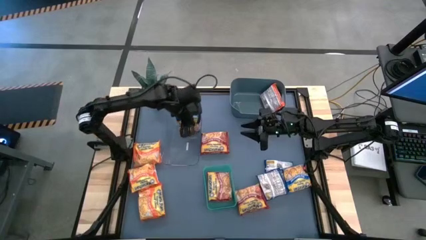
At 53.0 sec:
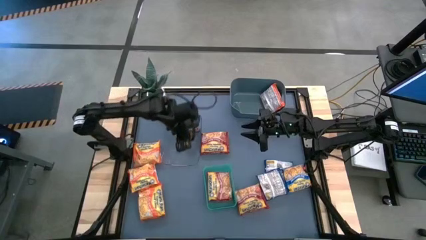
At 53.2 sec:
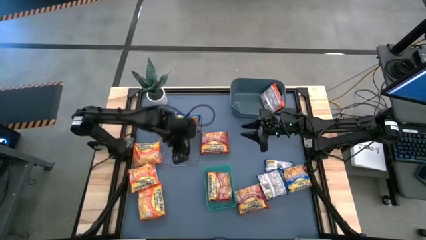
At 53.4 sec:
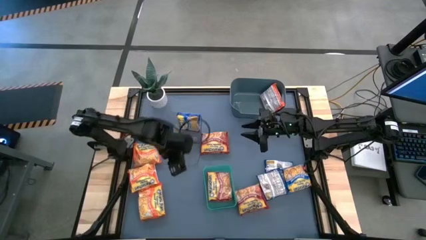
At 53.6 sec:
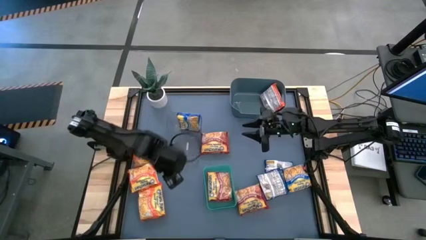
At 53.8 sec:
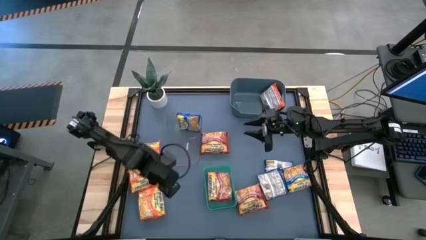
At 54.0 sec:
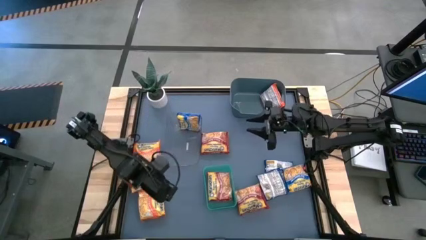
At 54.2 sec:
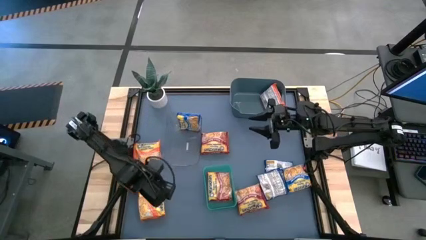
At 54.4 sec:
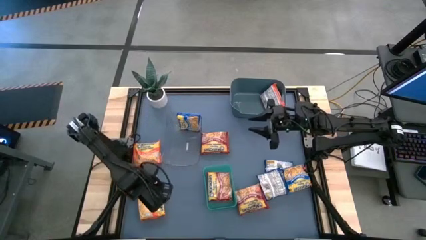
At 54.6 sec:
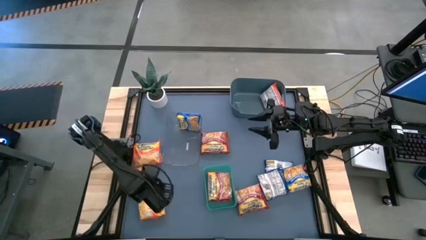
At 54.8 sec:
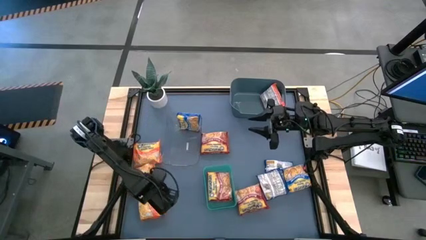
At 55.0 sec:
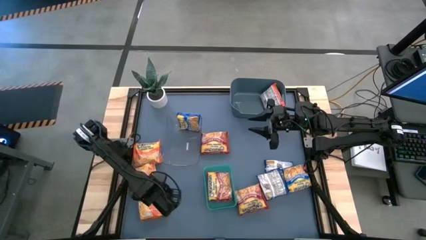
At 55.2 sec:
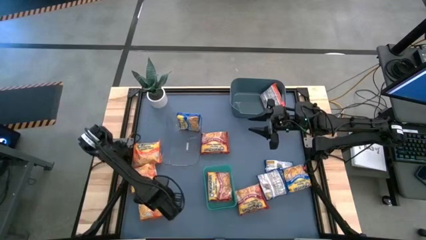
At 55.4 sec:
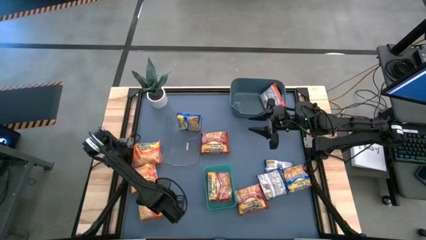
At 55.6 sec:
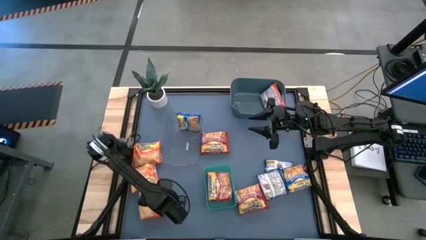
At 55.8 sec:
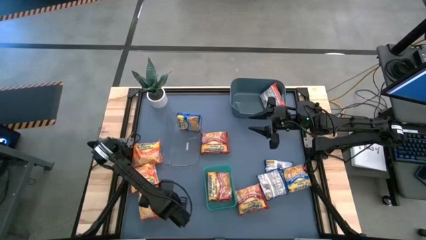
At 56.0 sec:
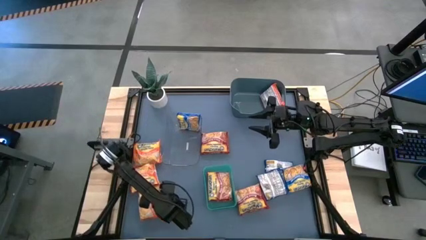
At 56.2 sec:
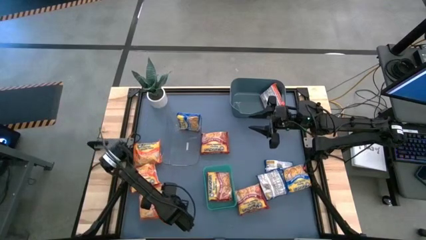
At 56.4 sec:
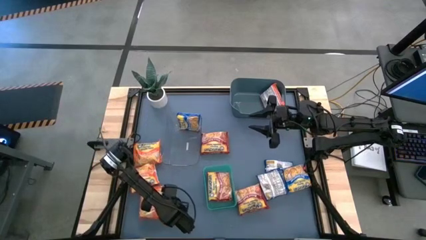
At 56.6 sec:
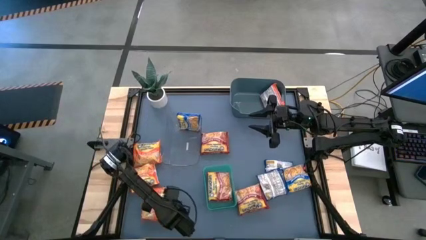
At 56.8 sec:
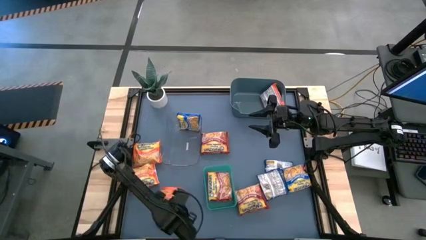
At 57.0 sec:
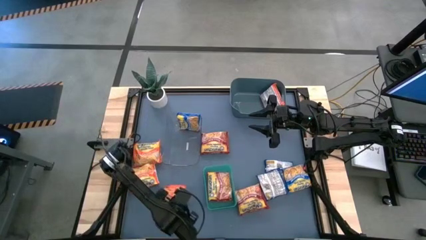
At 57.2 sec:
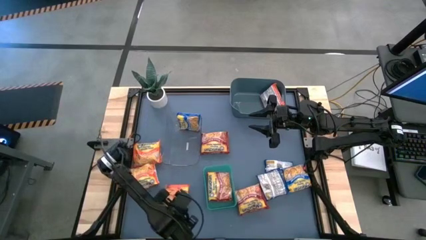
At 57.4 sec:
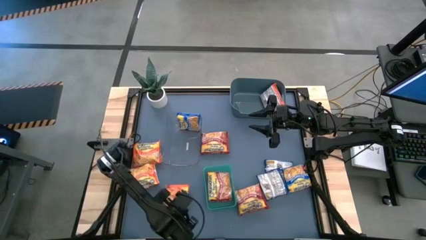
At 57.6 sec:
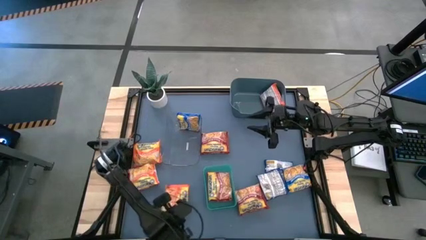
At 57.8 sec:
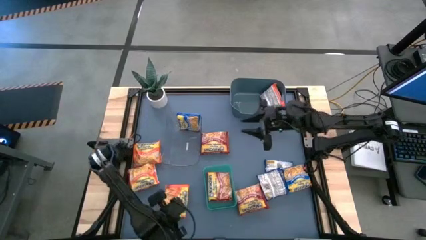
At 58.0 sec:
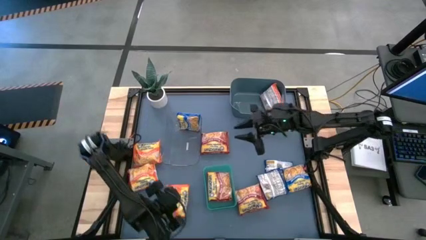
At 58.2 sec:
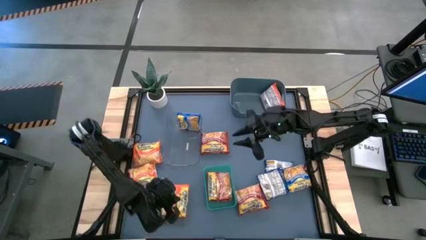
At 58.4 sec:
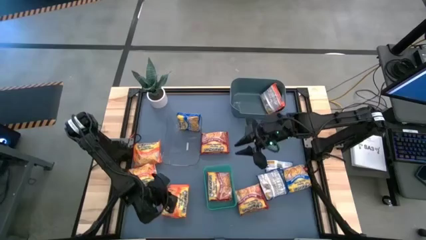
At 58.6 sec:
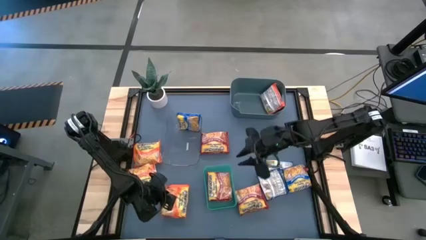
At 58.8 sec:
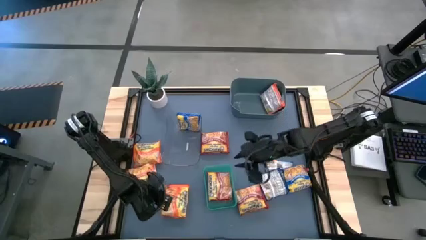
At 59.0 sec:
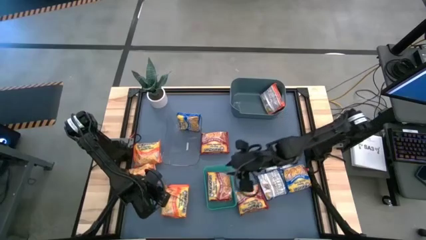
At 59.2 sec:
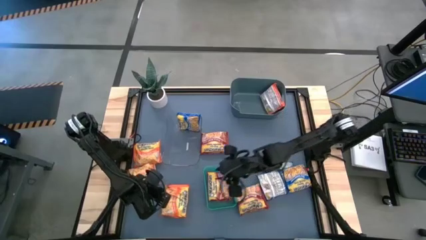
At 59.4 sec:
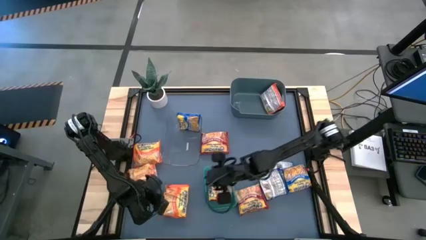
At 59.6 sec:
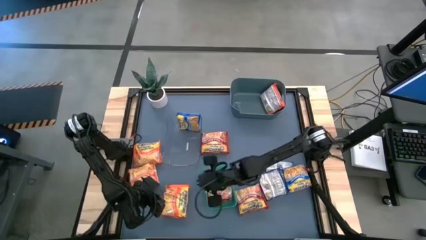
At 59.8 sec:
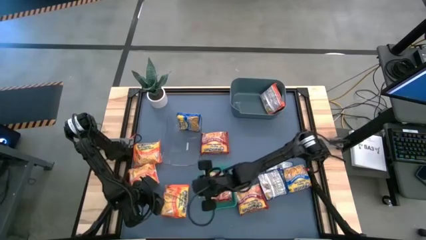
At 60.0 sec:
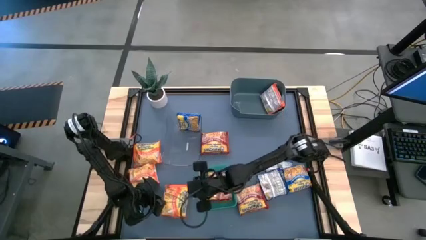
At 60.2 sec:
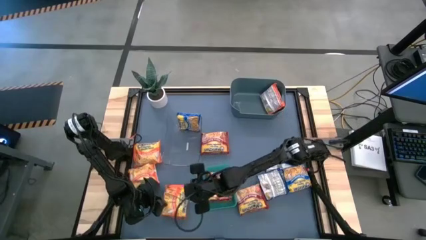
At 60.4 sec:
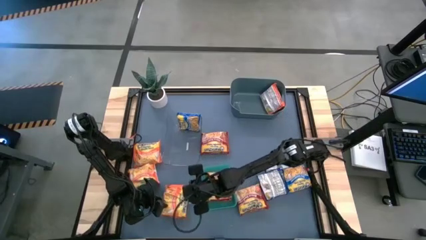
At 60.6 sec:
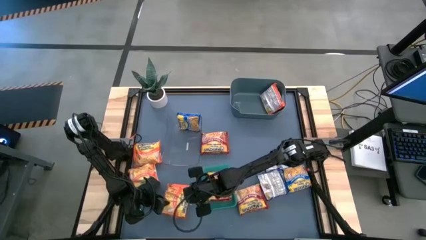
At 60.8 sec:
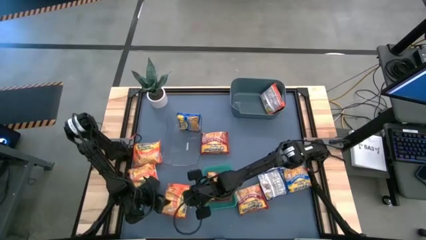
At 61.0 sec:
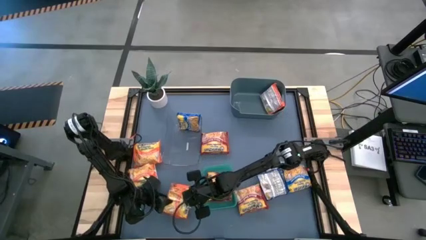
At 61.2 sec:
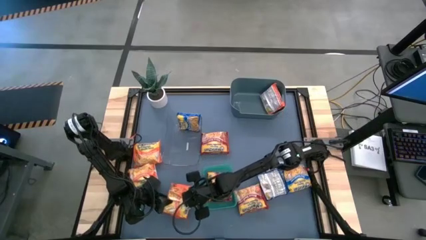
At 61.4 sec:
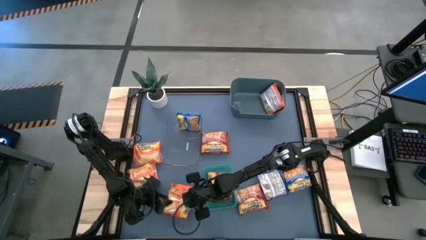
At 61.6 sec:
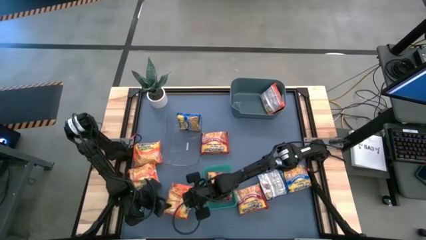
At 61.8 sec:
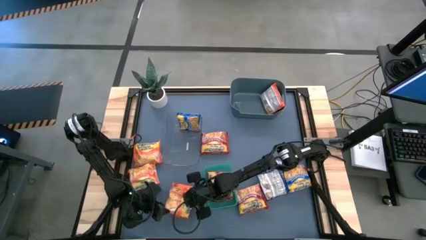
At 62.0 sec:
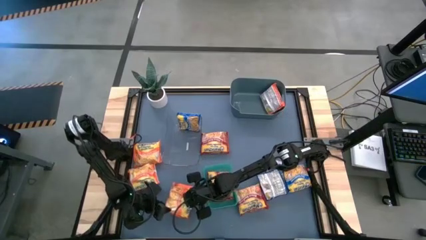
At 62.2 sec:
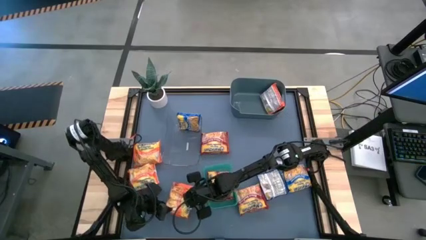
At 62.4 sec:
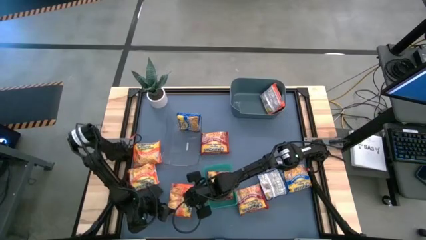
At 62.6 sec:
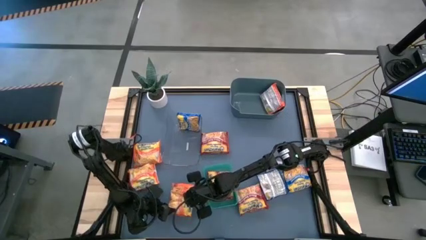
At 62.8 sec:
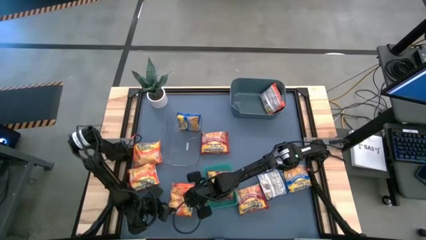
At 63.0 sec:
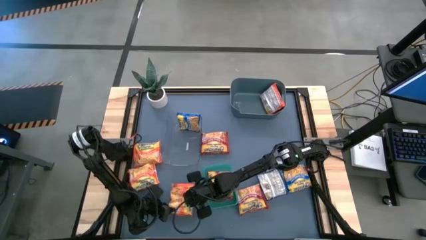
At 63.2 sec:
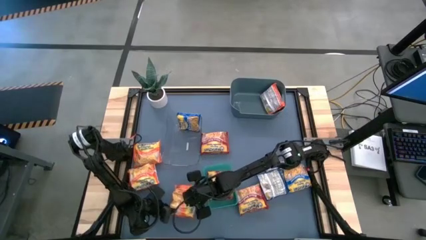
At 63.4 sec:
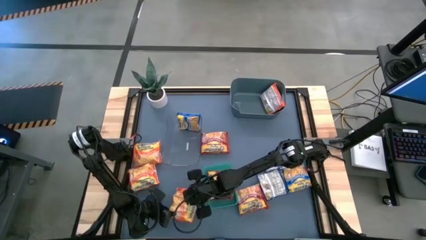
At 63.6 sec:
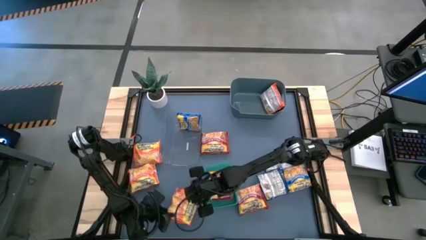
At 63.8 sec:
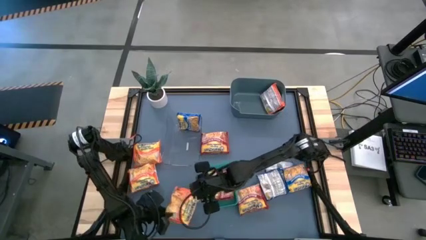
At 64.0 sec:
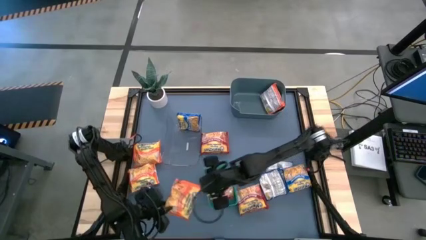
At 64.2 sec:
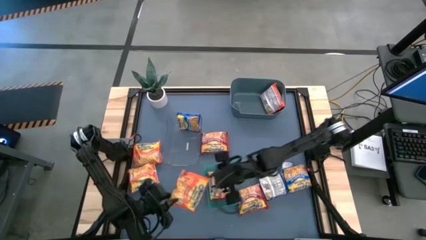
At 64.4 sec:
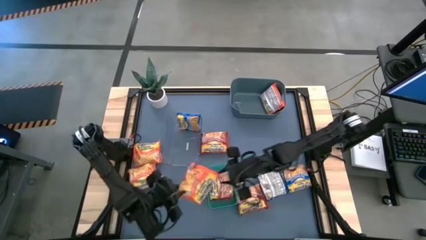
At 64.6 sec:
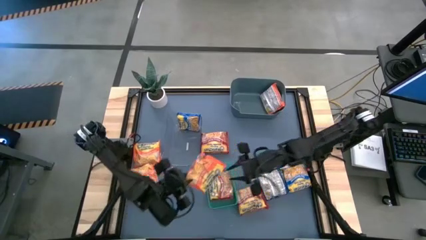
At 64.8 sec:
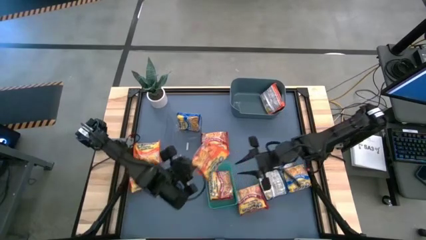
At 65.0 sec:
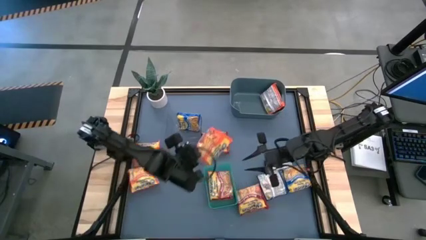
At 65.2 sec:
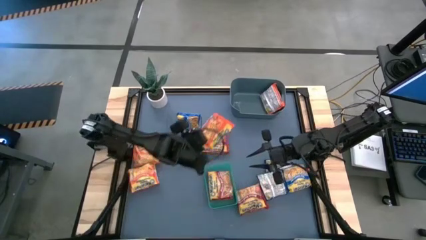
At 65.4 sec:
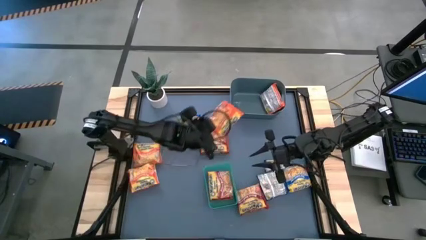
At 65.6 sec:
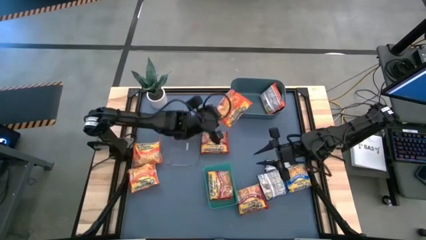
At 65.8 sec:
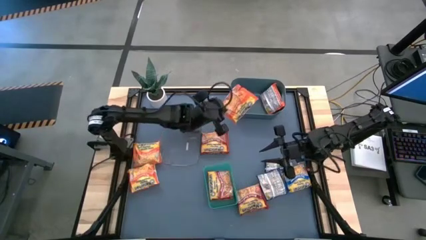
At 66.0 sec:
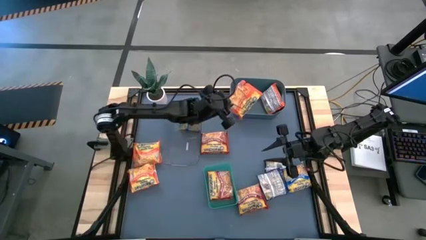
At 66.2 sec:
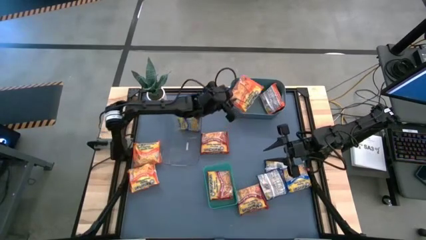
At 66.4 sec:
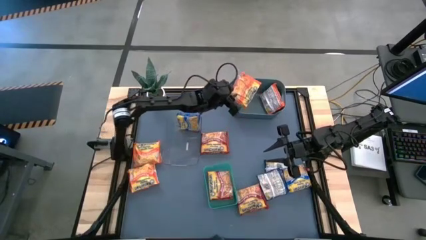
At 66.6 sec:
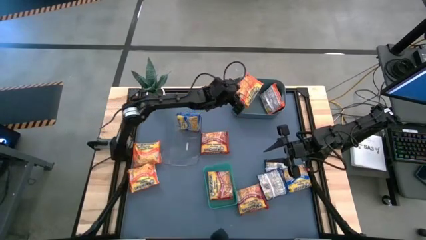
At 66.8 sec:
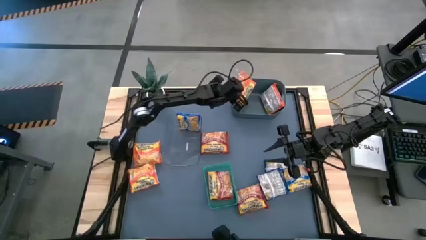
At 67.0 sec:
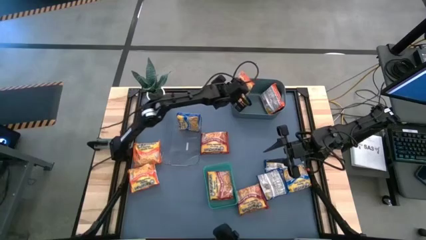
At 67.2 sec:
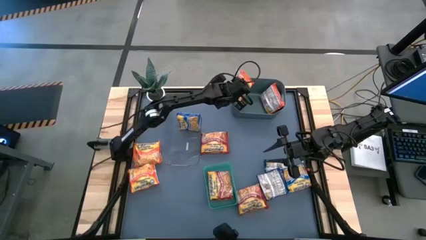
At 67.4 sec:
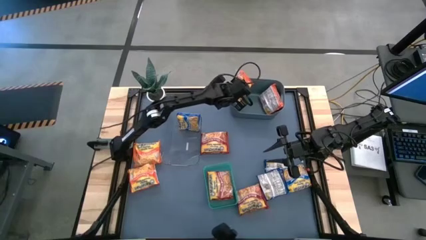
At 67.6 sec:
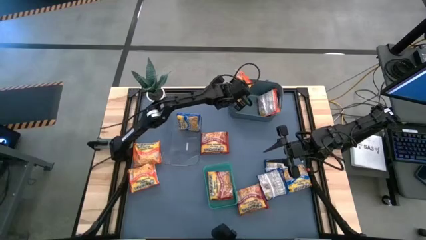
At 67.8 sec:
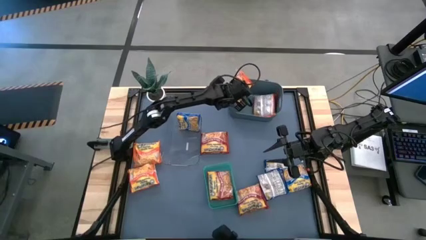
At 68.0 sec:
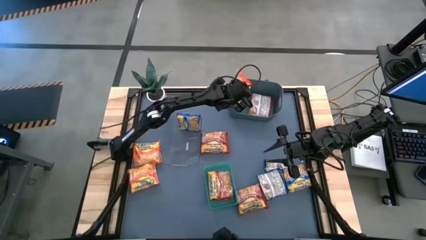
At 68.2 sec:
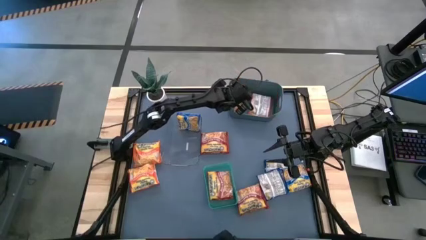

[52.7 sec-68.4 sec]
Task: Sort Maruchan noodles
Put the orange noodle pack into the dark blue bin
